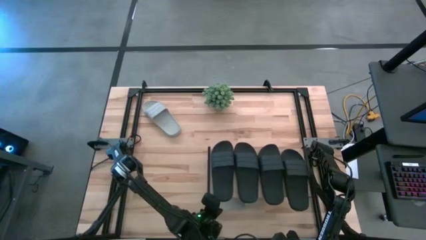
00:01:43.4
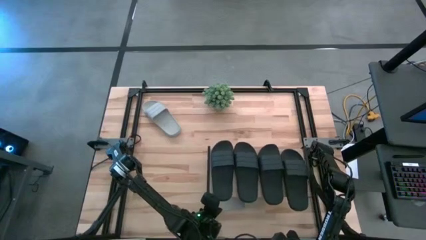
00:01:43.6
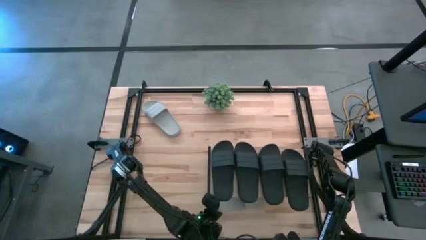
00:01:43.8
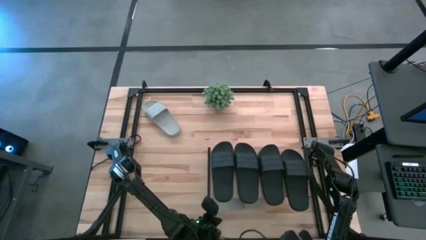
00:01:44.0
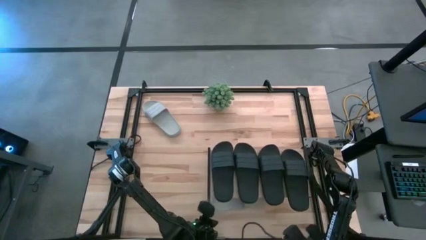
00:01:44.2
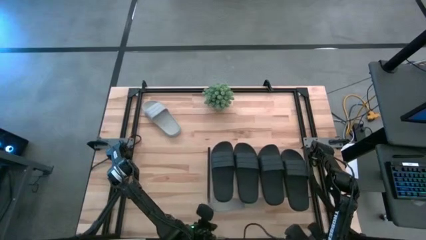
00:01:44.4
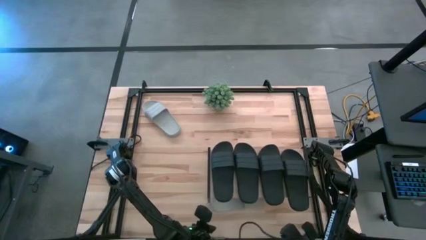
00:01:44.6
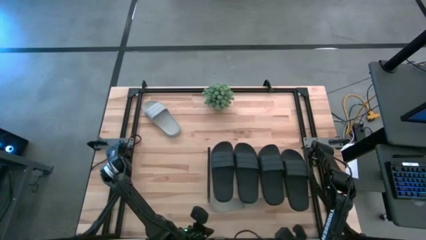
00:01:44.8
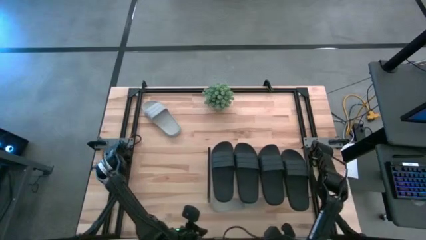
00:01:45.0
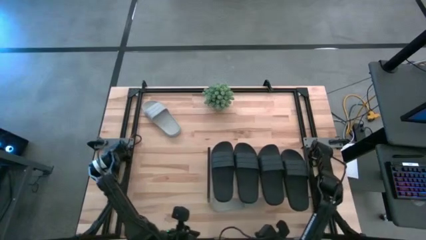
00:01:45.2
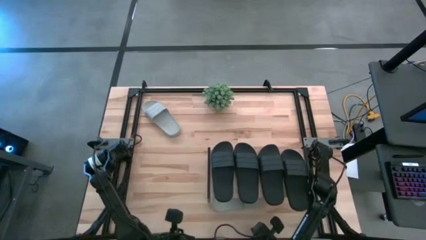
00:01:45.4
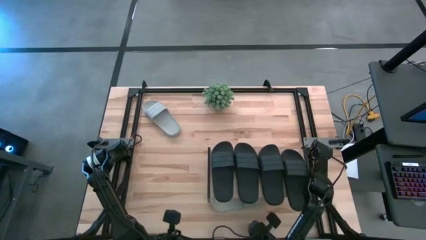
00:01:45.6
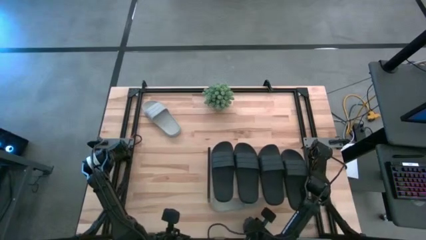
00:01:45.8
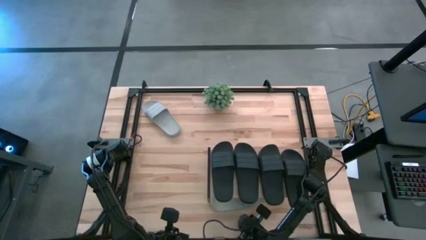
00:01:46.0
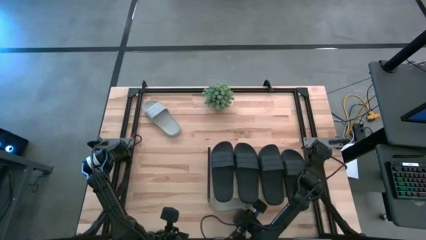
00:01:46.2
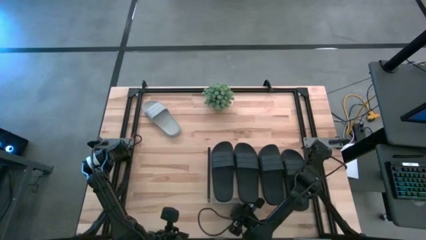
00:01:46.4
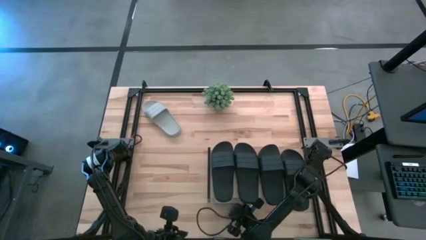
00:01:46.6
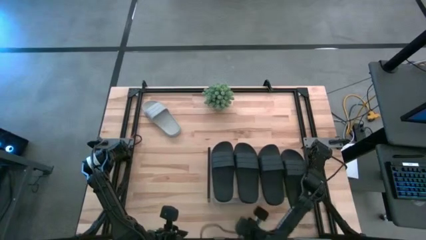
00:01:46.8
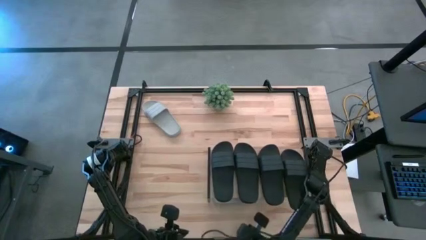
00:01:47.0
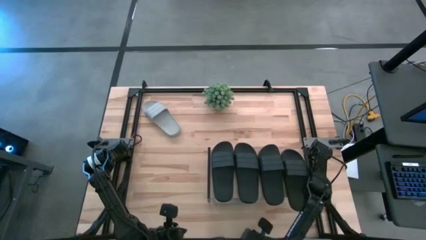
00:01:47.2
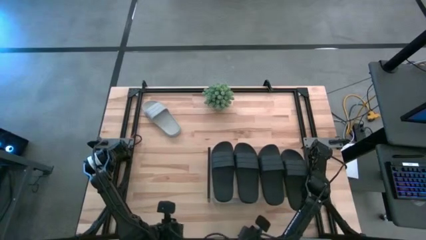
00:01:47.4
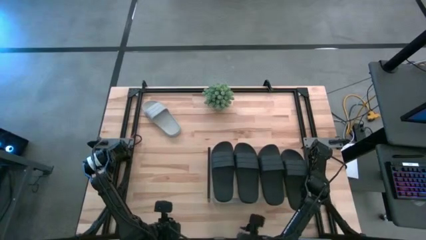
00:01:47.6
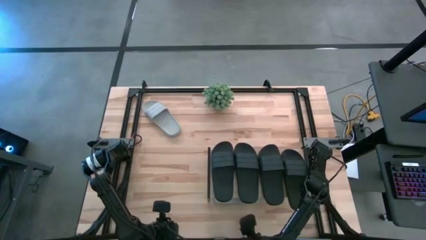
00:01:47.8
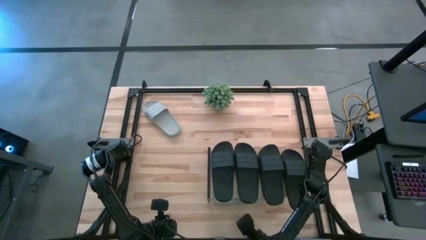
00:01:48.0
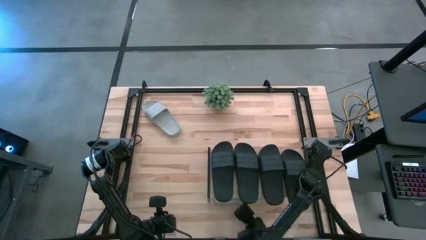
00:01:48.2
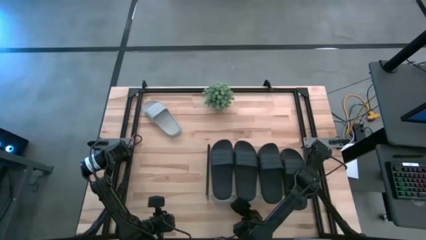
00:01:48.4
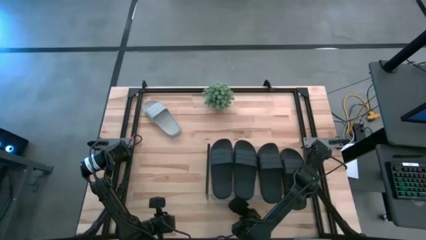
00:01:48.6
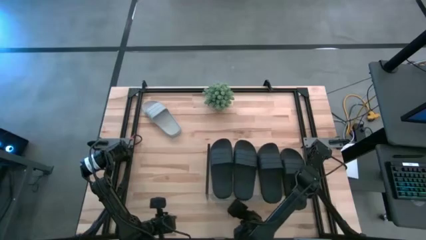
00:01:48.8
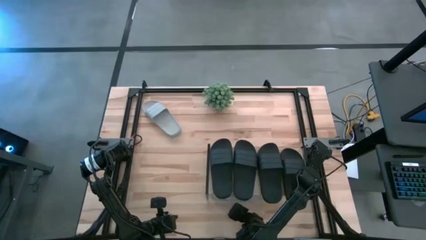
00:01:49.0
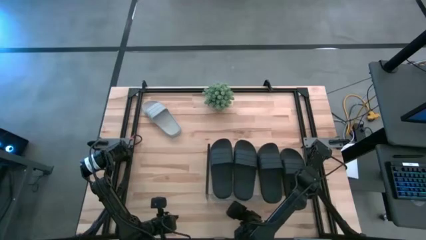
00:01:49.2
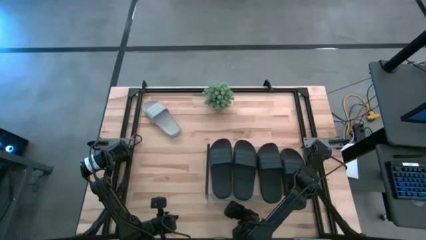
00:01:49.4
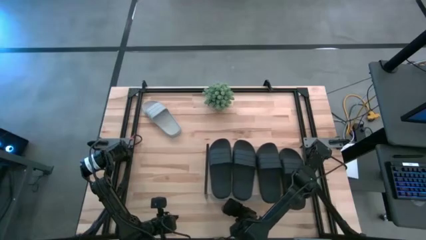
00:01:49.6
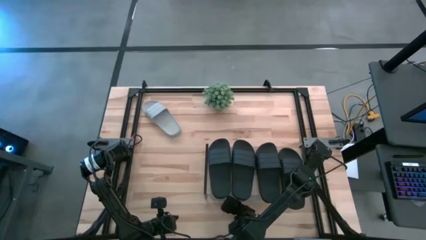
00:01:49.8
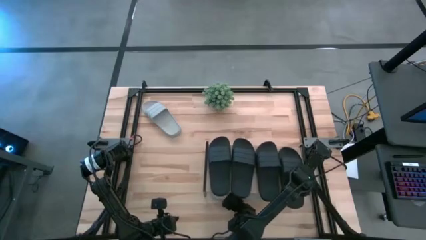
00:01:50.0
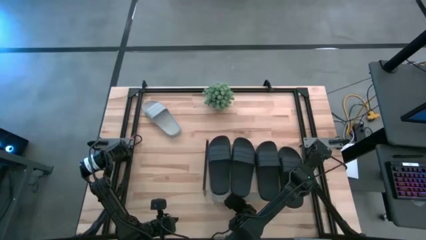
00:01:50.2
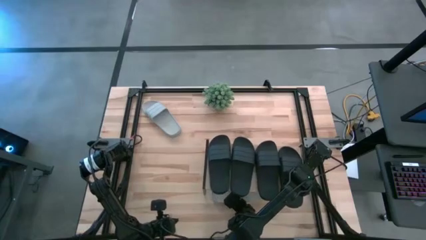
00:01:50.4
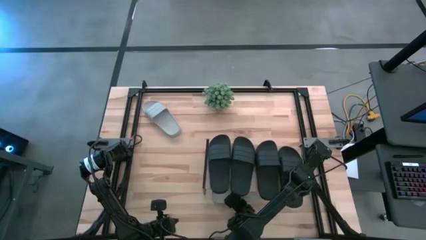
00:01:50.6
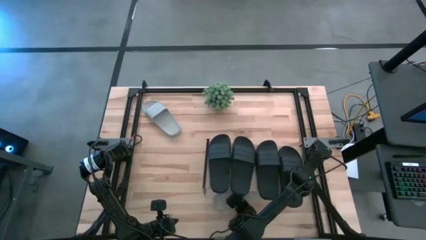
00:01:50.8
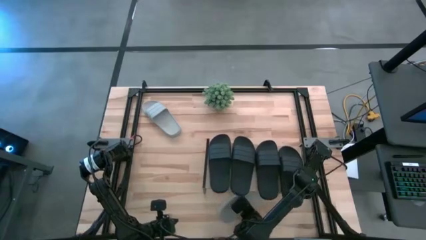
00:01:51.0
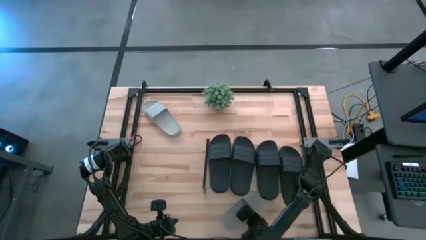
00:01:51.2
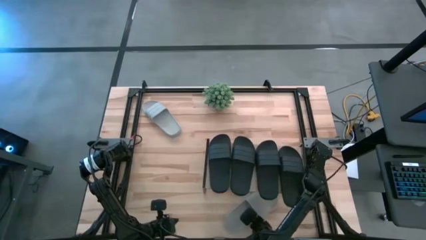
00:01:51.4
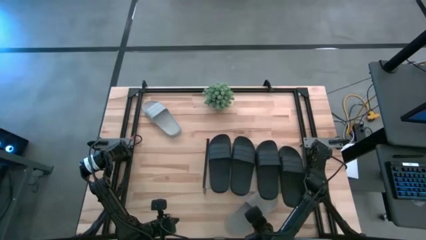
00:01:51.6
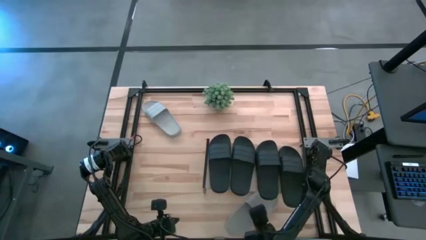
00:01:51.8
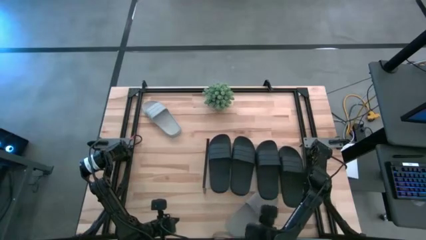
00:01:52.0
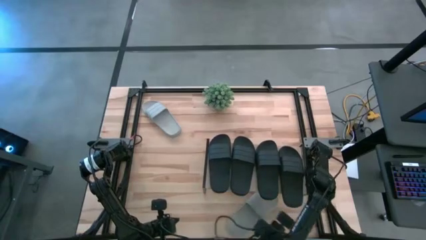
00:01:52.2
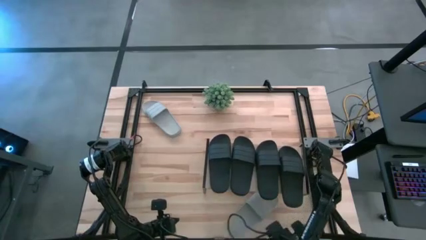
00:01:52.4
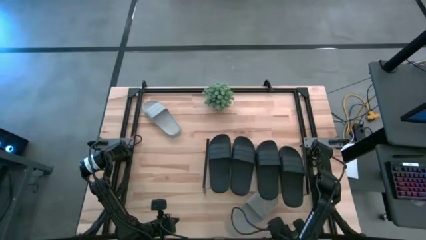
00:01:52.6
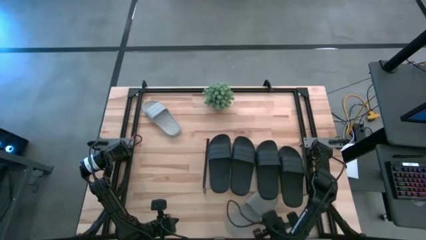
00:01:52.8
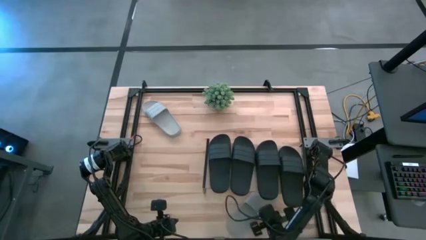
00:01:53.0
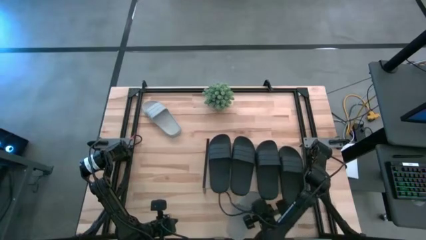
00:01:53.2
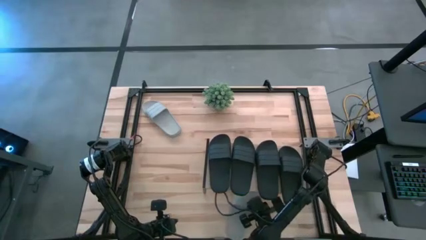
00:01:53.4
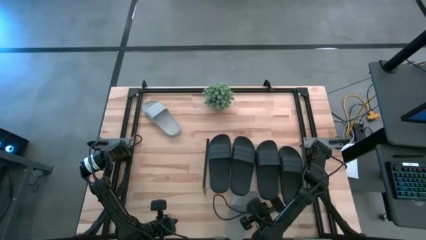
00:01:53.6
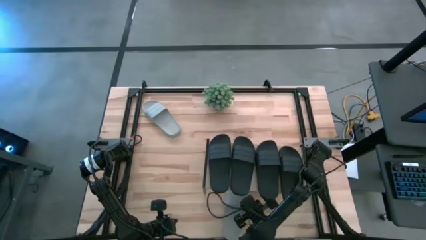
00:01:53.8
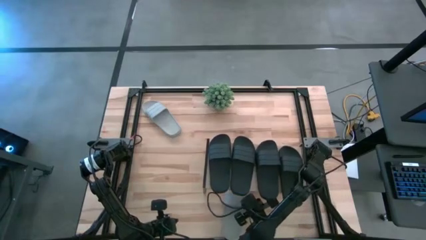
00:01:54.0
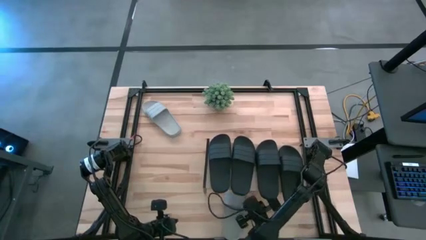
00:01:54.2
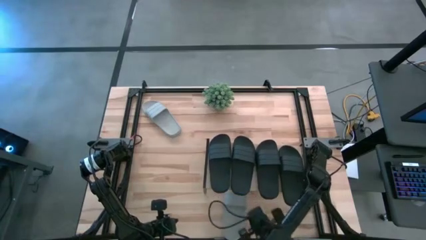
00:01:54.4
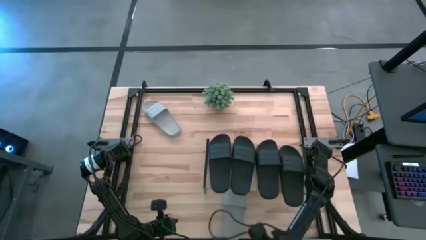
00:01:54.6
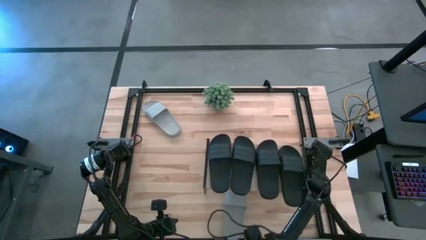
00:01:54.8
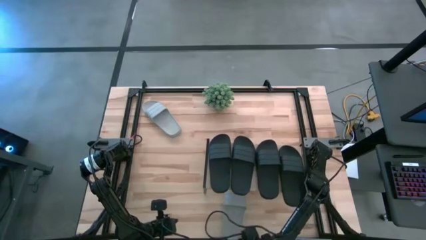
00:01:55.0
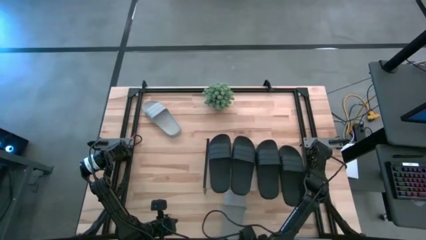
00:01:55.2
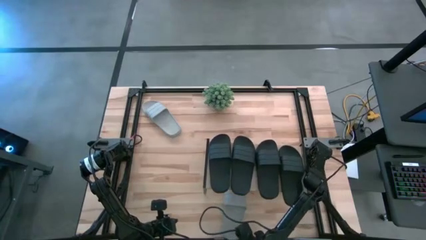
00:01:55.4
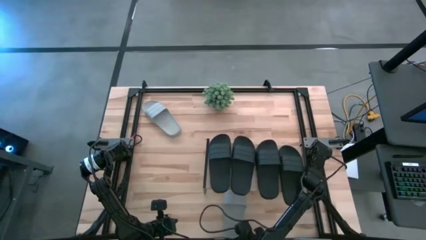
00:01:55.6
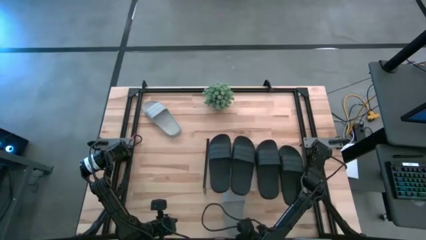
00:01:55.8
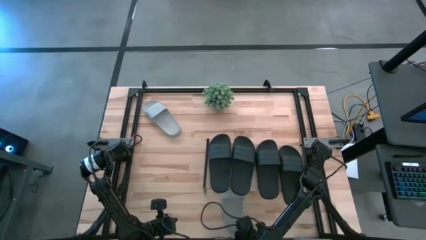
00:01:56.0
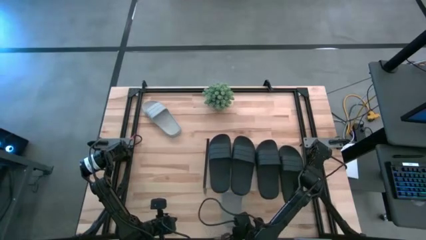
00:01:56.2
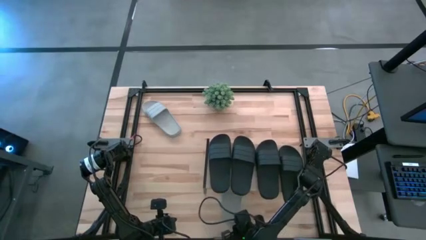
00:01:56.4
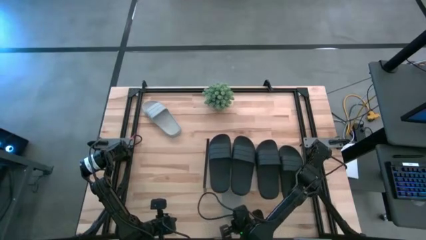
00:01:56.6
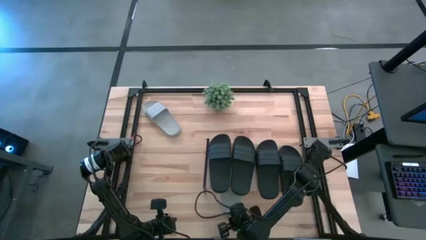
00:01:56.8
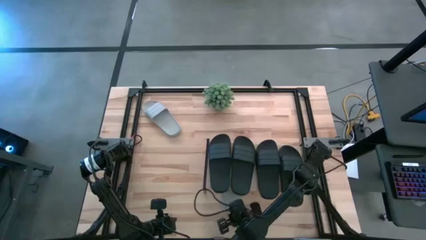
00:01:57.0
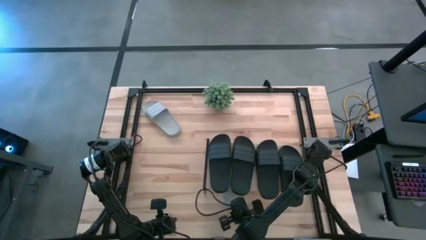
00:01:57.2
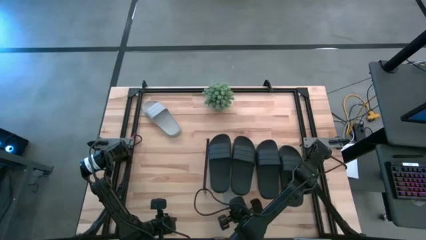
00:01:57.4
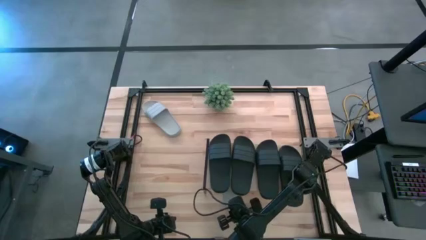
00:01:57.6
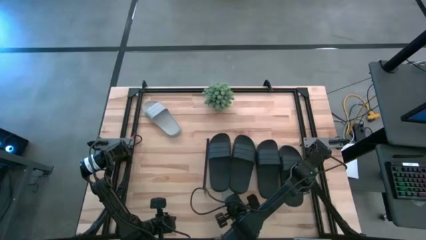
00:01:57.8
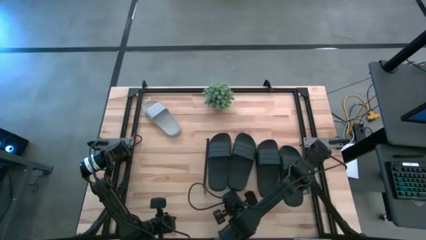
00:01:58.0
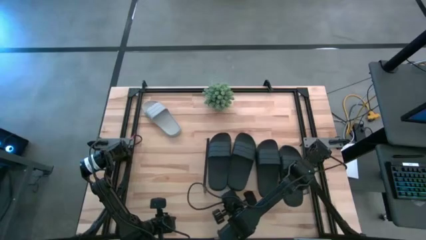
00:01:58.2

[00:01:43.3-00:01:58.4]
Task: Pick and place slides into the shelf
Put the white slipper under the shelf
